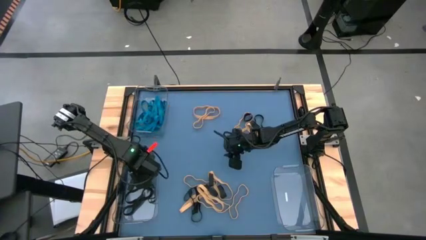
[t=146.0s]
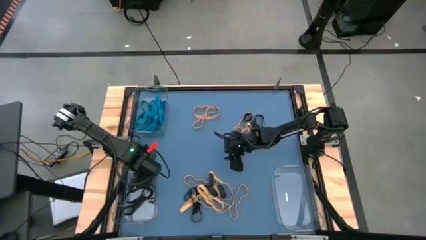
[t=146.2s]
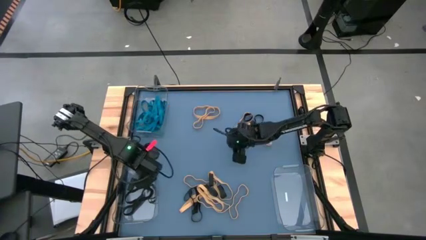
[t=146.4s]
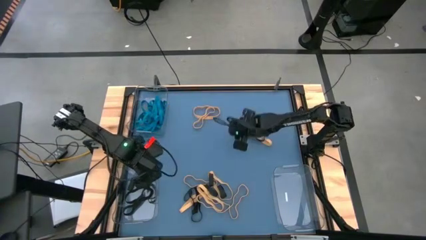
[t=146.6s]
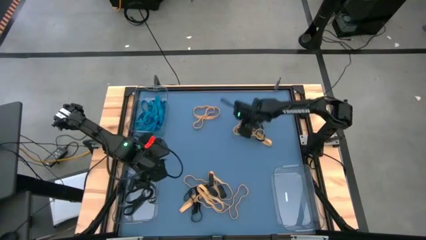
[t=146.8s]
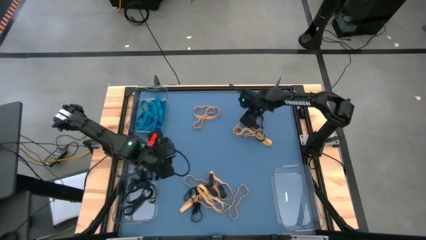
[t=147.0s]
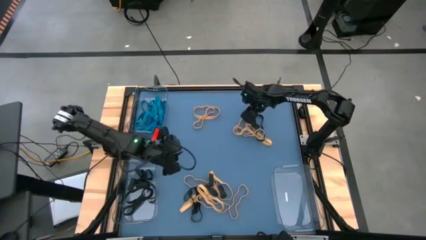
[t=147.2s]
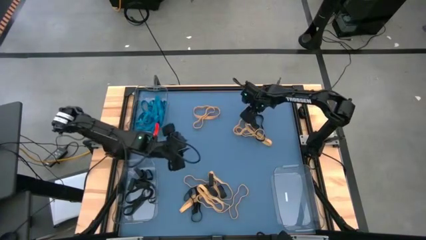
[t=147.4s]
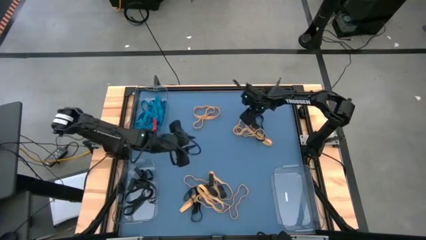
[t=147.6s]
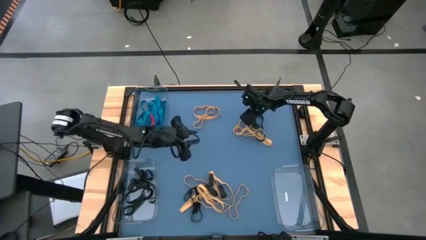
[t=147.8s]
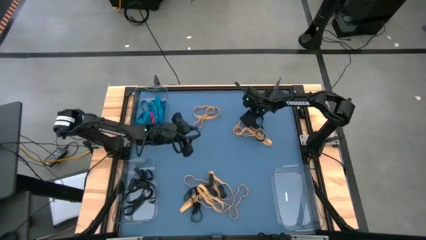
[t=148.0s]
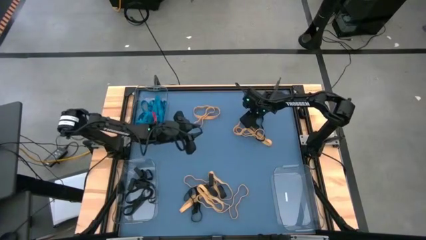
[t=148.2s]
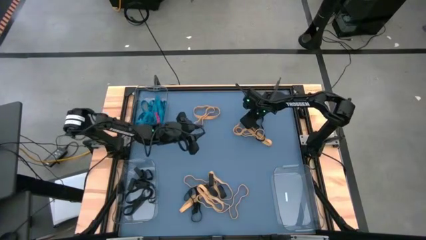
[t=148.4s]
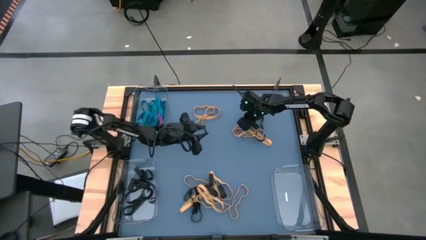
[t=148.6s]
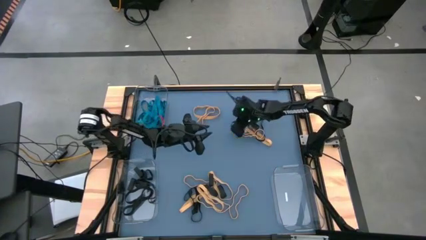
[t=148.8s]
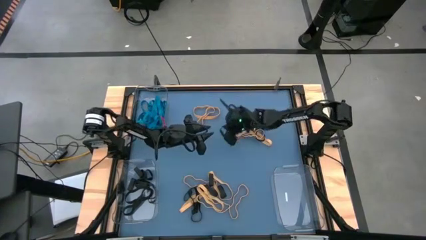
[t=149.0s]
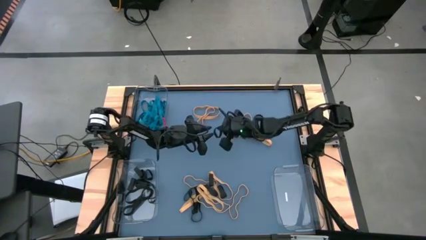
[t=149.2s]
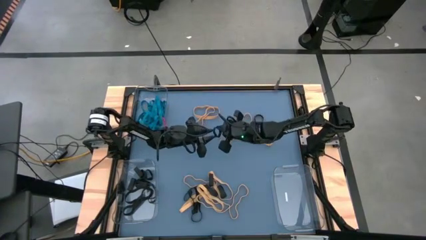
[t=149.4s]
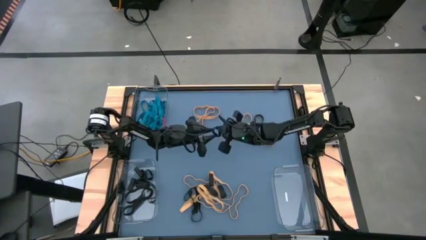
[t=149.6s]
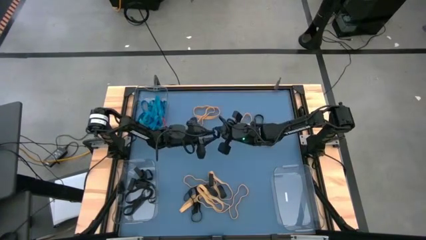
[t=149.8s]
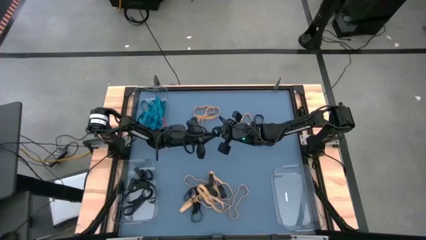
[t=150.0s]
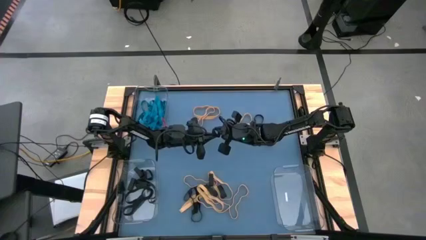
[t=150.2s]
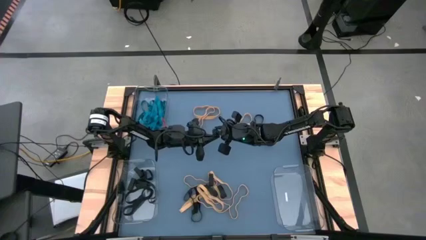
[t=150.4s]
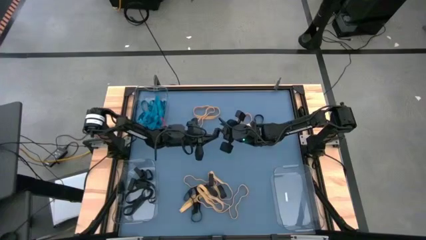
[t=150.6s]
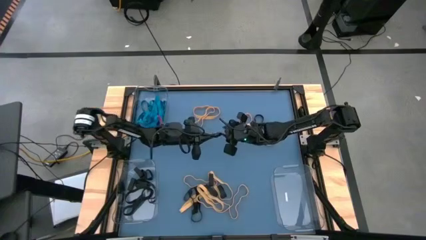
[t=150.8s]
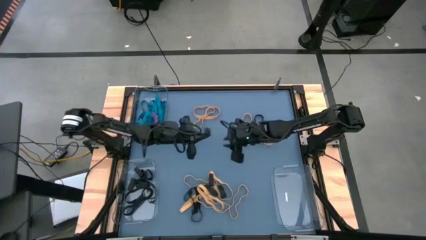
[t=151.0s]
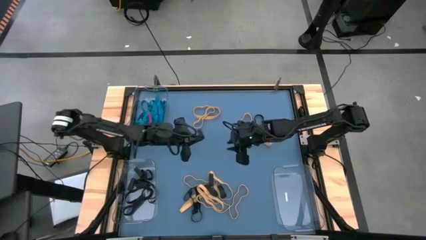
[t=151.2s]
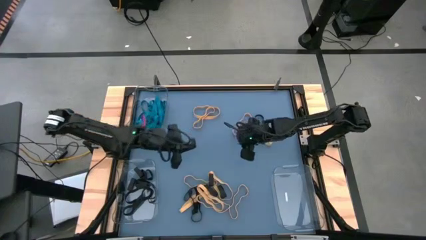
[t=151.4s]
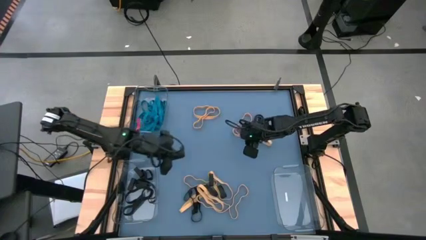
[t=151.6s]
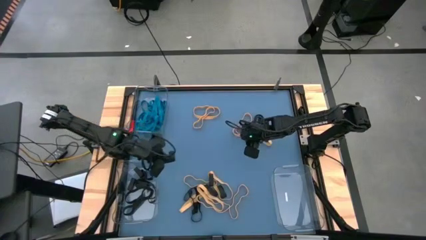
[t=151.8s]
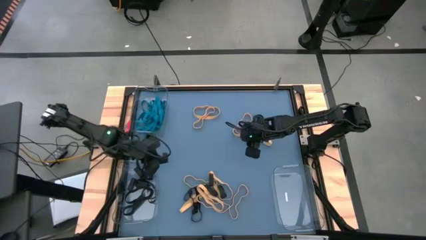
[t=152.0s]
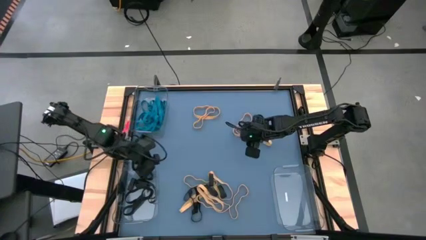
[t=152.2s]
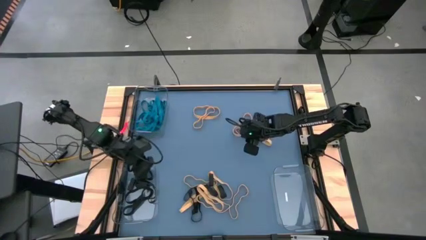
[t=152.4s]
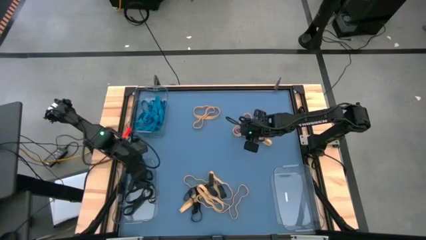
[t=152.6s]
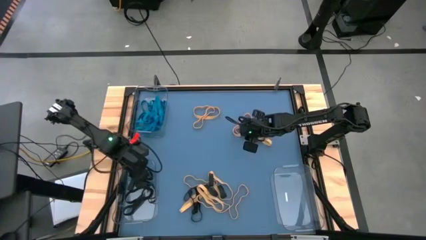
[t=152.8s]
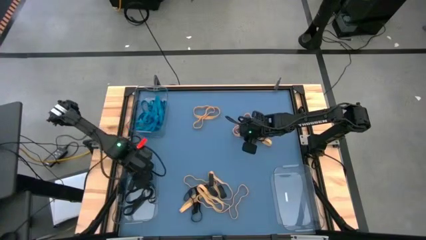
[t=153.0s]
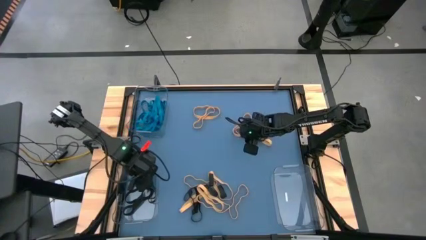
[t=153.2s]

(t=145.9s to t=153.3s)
Task: Sort rubber bands into baskets
Put the black rubber band into the bottom left transparent bin

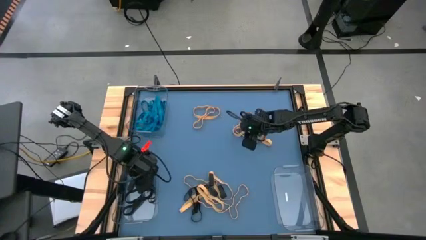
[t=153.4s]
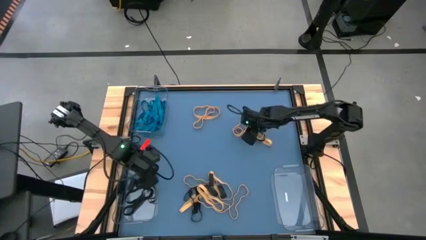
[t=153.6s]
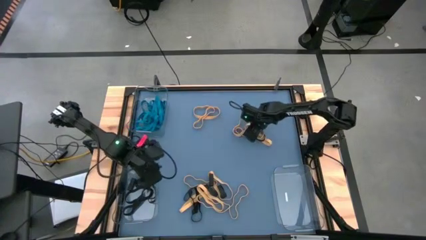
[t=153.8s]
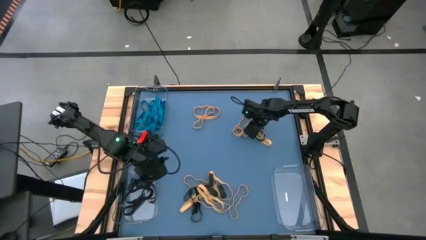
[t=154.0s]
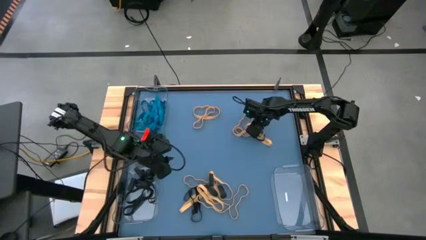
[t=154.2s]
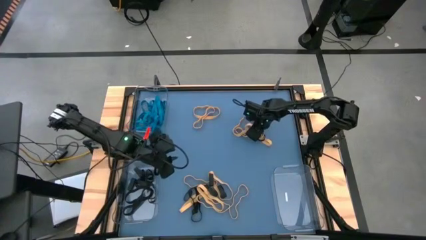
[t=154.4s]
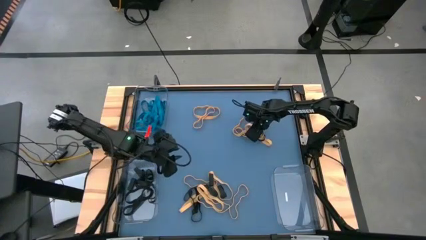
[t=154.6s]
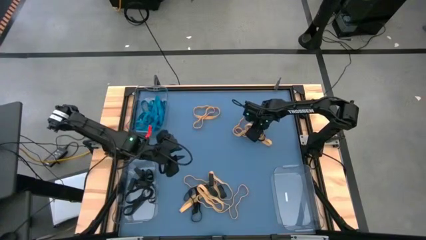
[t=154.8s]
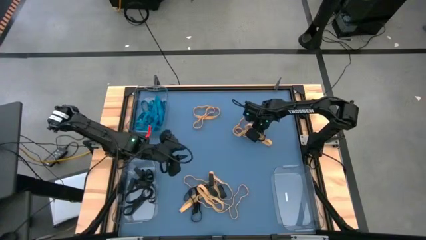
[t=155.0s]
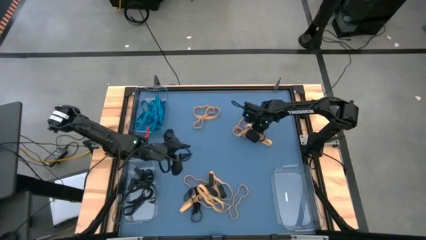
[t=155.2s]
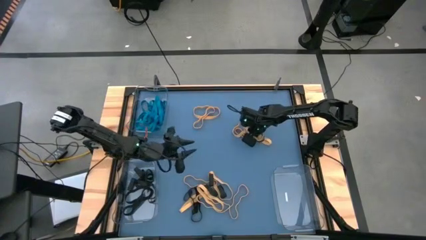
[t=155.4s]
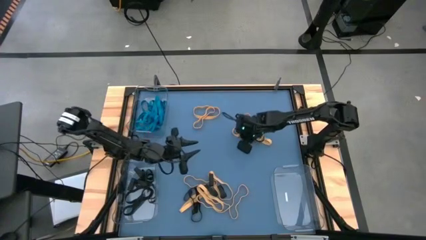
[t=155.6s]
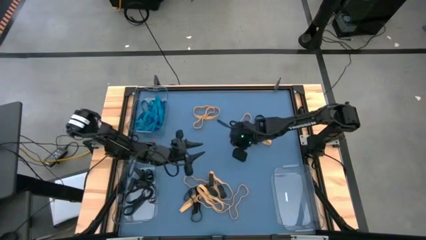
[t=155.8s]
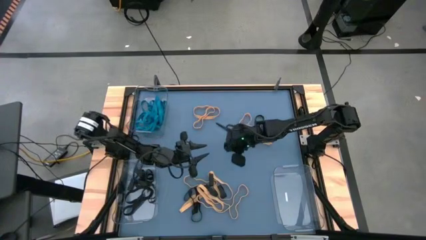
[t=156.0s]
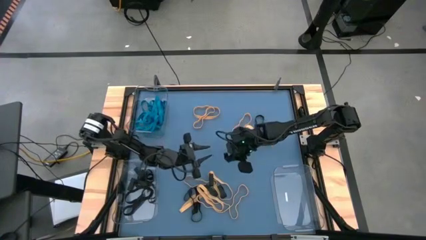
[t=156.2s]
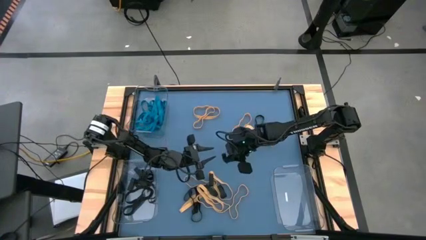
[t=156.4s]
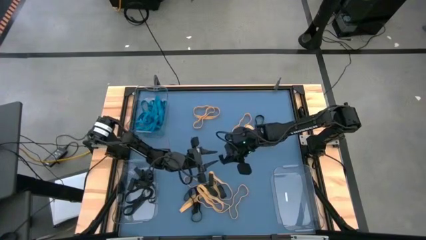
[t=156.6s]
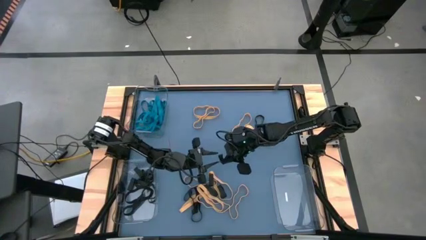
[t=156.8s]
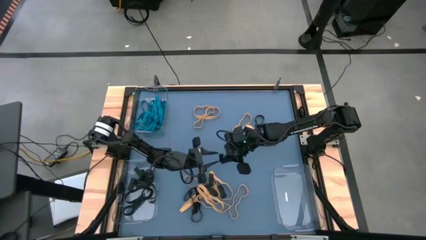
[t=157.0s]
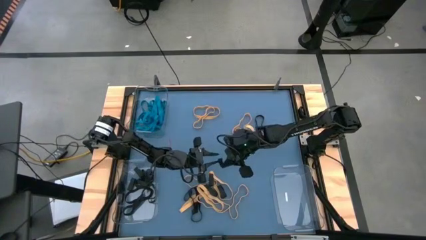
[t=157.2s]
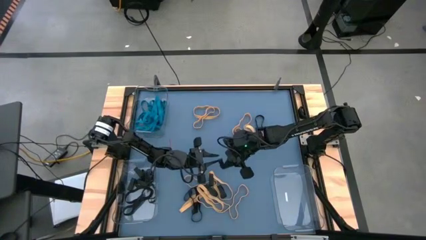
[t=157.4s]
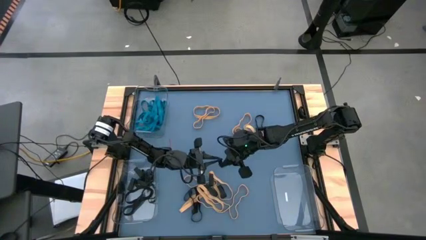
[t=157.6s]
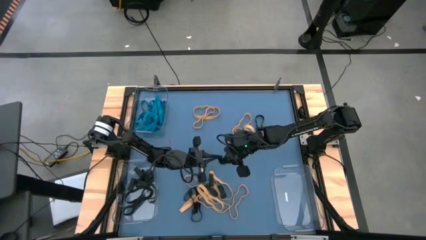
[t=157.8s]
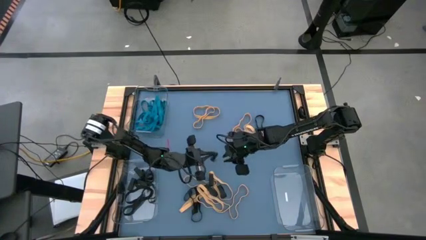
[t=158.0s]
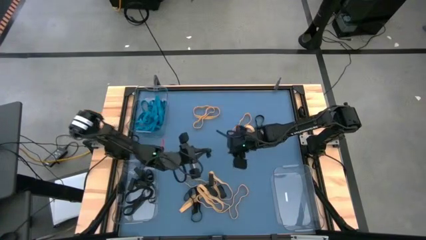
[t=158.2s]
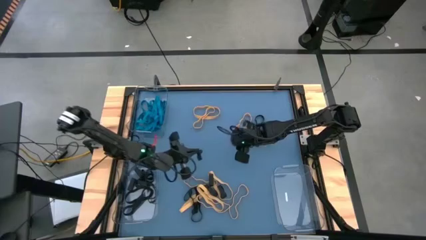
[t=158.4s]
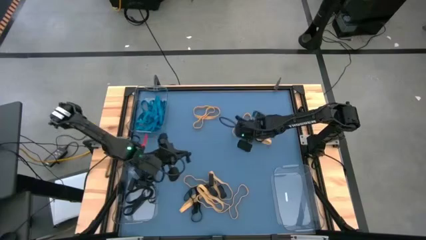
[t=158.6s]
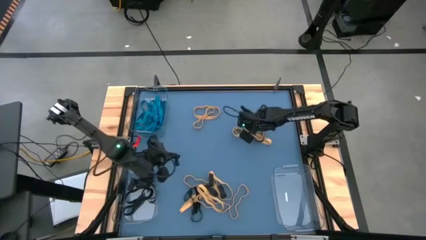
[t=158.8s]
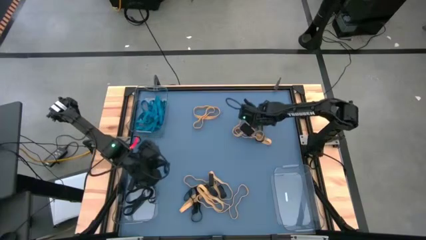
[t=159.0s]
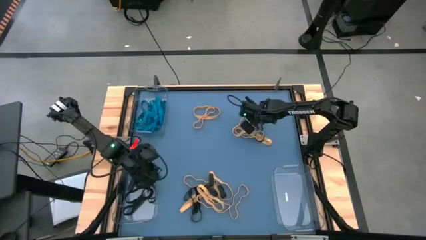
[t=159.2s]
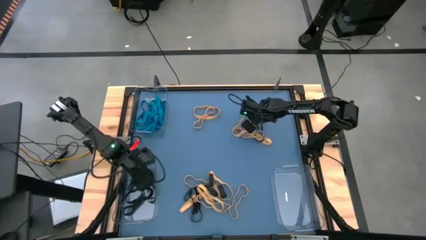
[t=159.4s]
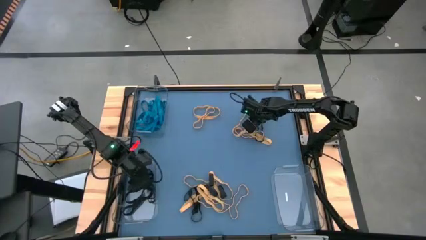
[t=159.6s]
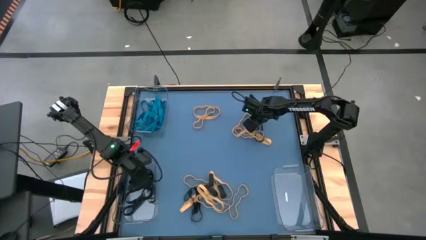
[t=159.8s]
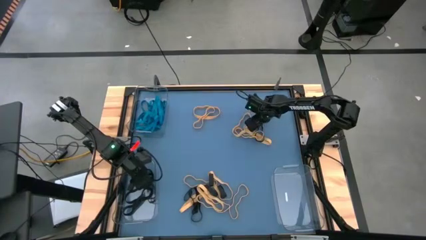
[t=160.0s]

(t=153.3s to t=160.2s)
Put the black rubber band into the bottom left transparent bin
